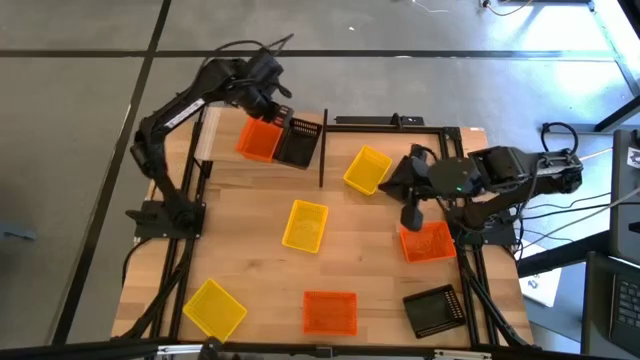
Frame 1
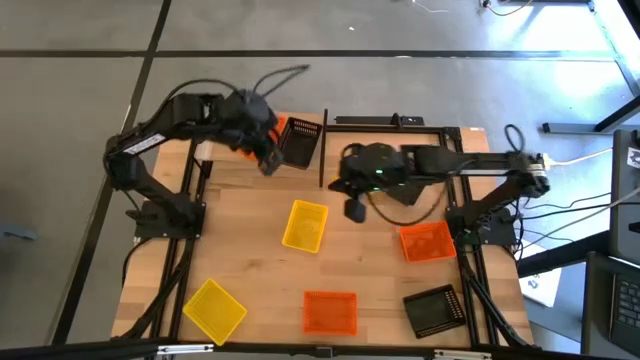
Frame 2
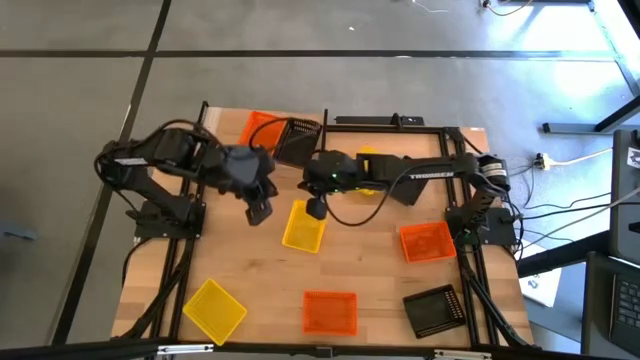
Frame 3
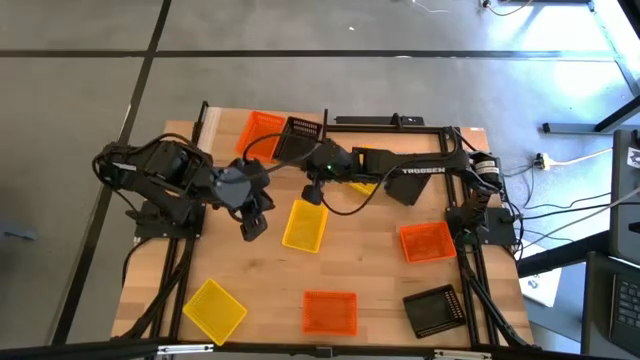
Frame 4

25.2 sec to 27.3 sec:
Task: Stack baskets on shelf by color
Adjust the black basket on the shelf

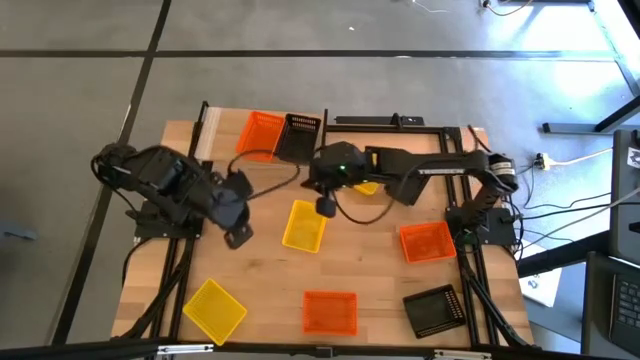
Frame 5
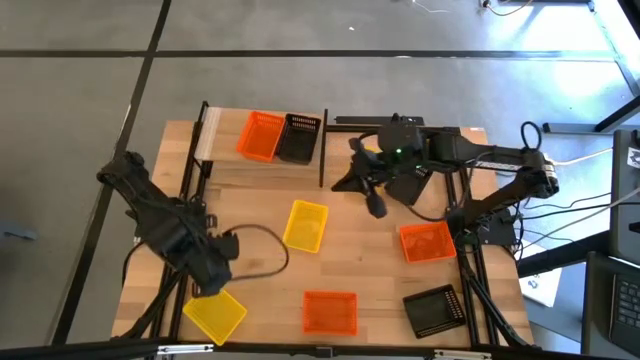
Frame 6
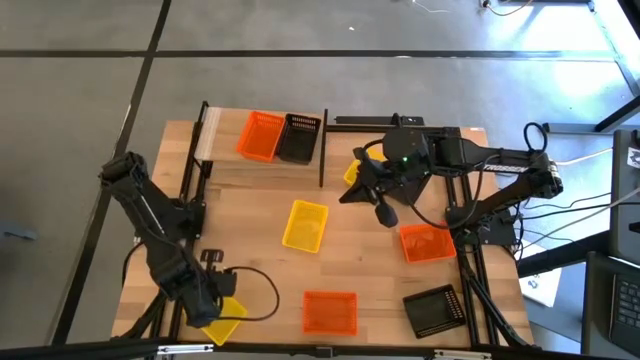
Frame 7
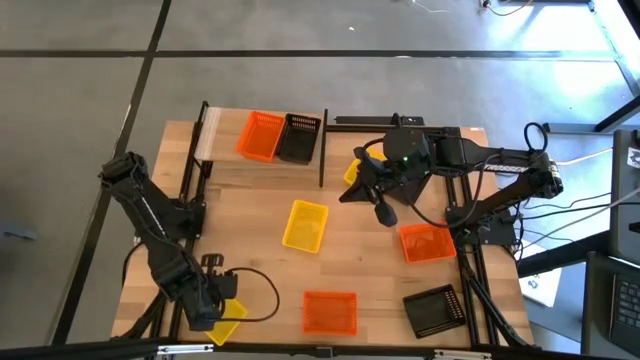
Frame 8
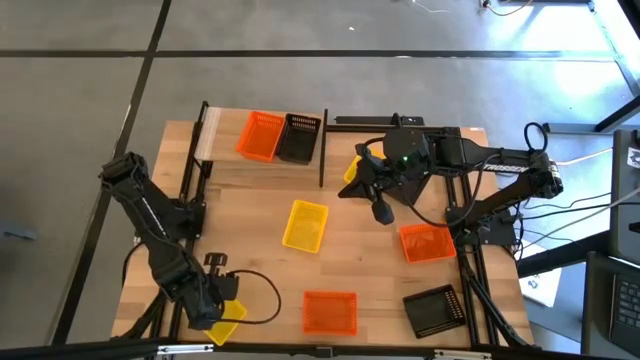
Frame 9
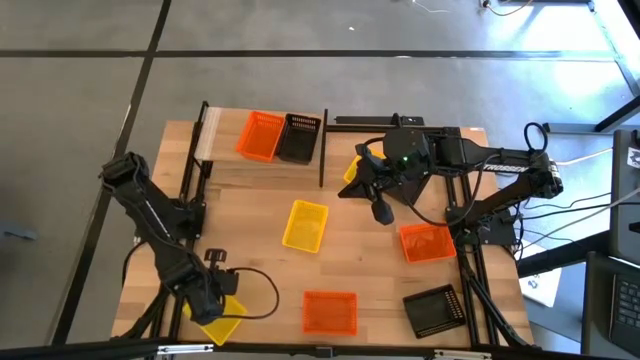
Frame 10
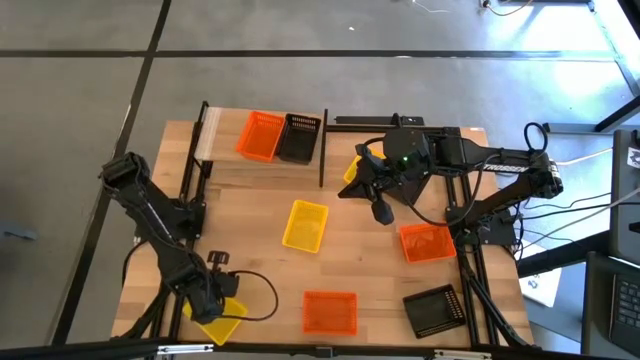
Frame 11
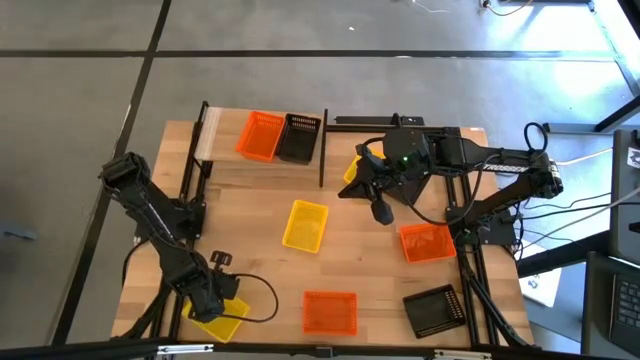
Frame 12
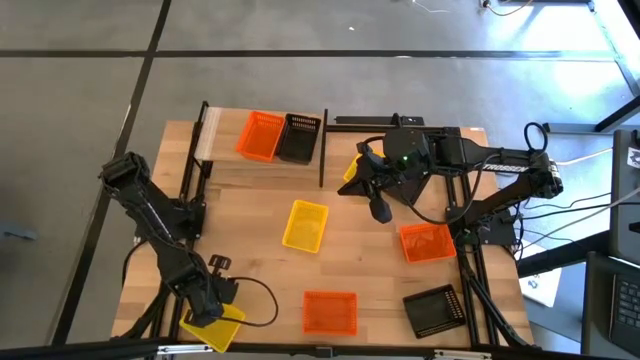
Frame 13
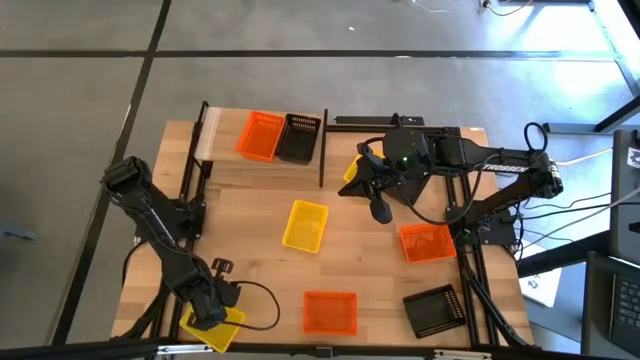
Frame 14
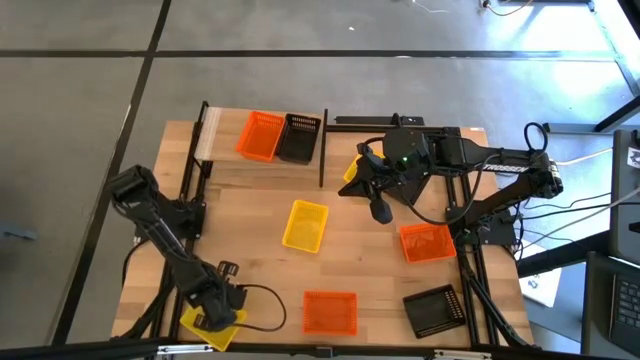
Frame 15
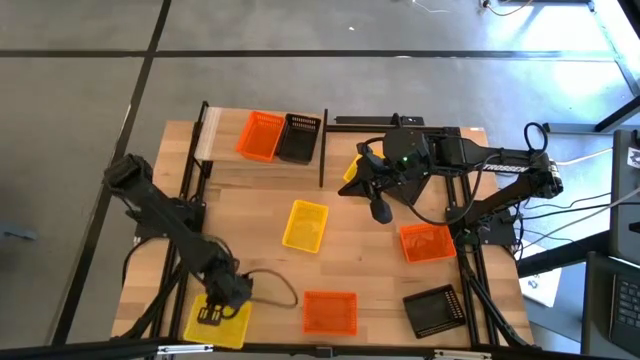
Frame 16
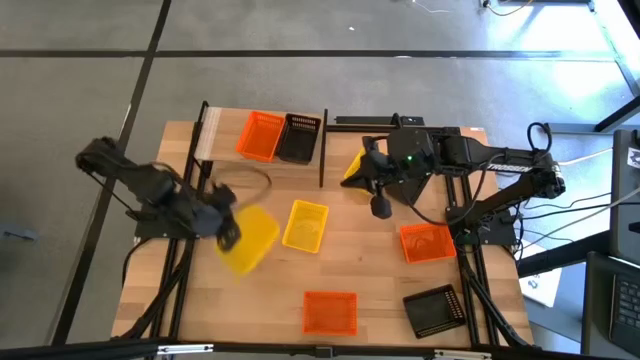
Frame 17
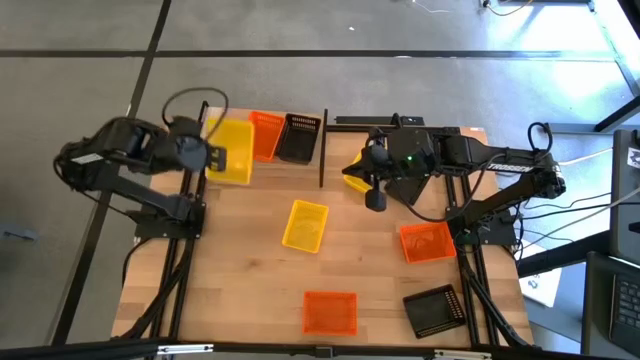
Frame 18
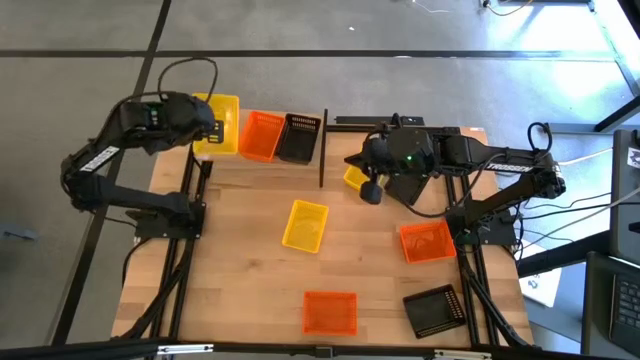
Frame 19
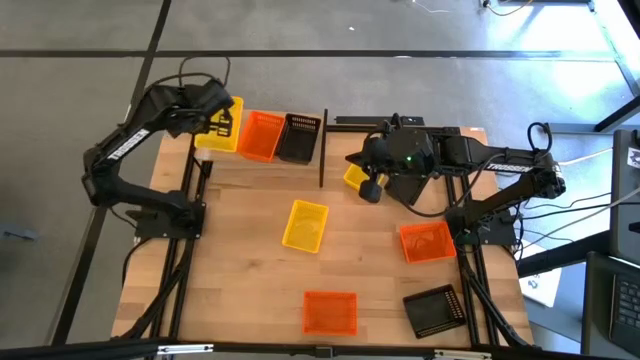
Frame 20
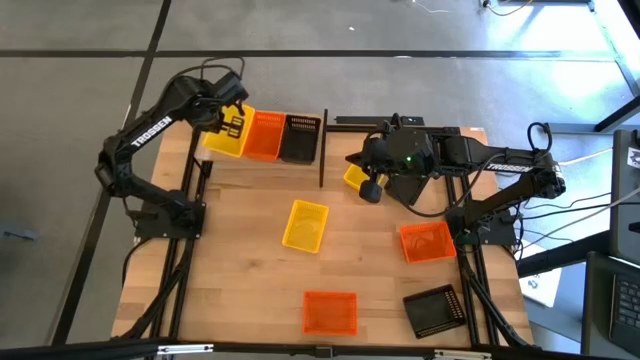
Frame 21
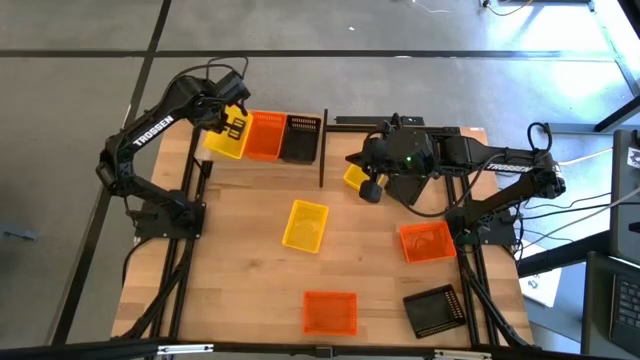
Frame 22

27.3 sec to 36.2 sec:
Put the bottom yellow basket on the shelf

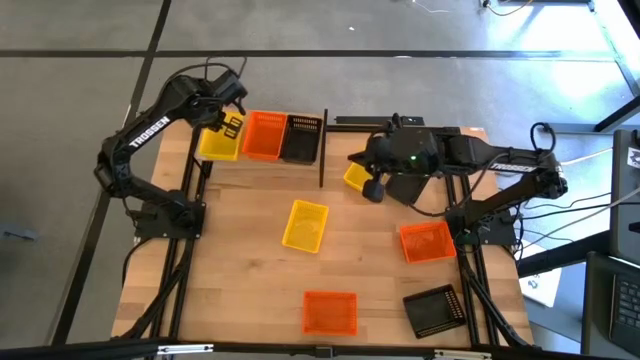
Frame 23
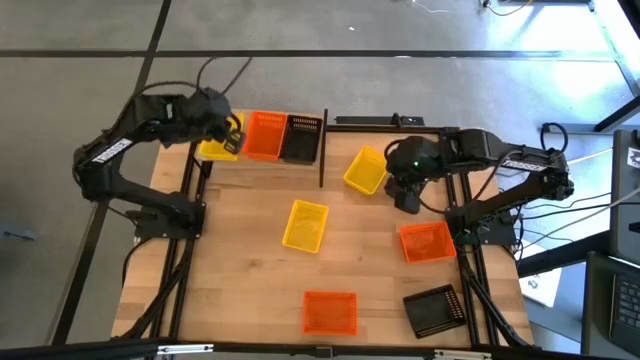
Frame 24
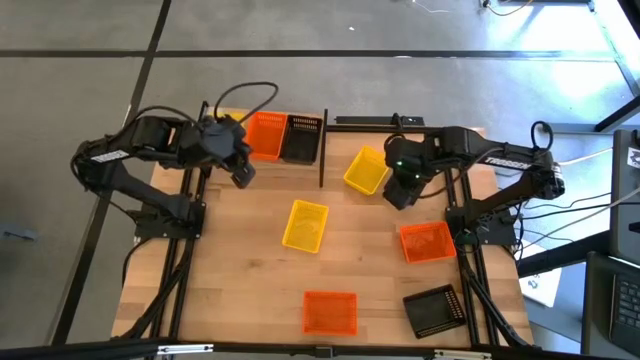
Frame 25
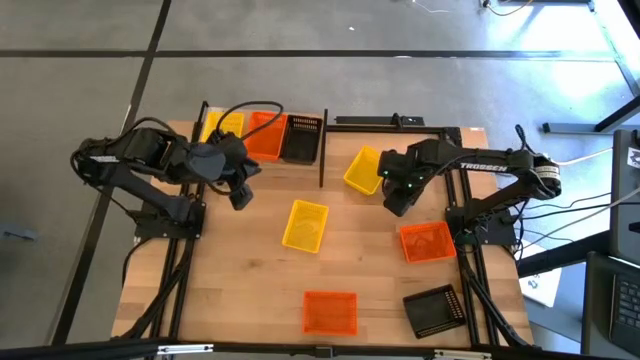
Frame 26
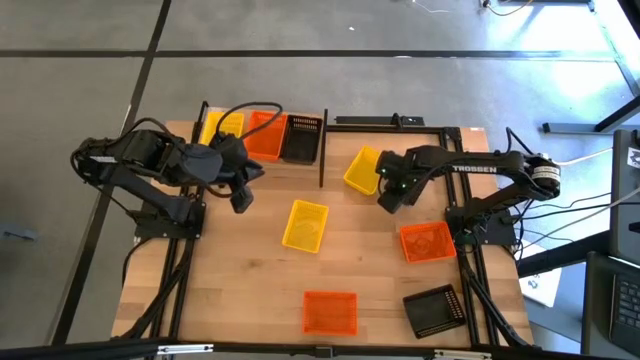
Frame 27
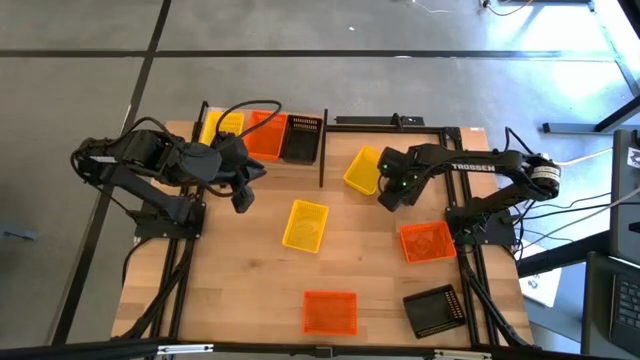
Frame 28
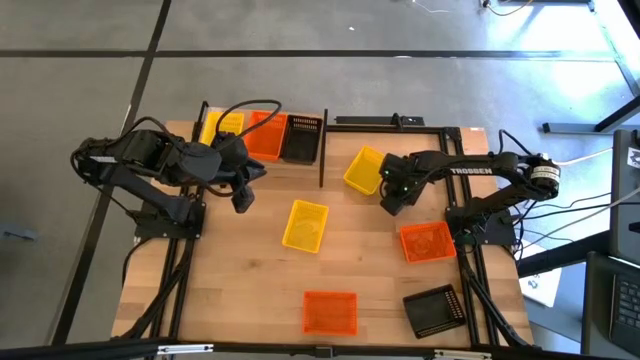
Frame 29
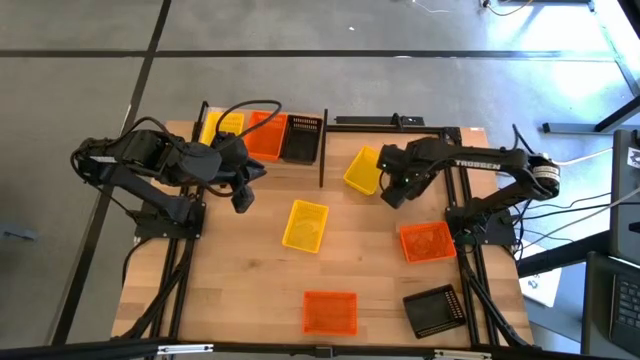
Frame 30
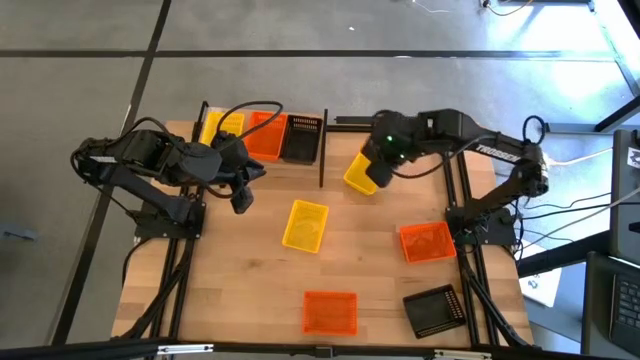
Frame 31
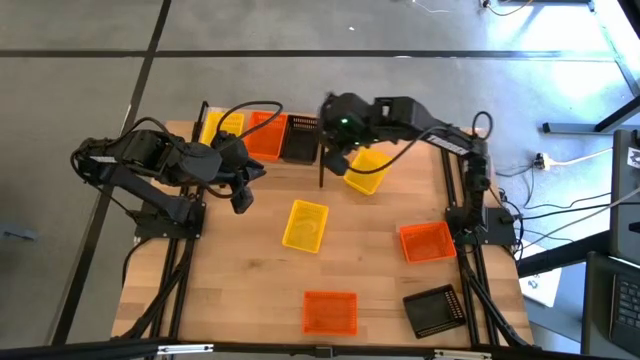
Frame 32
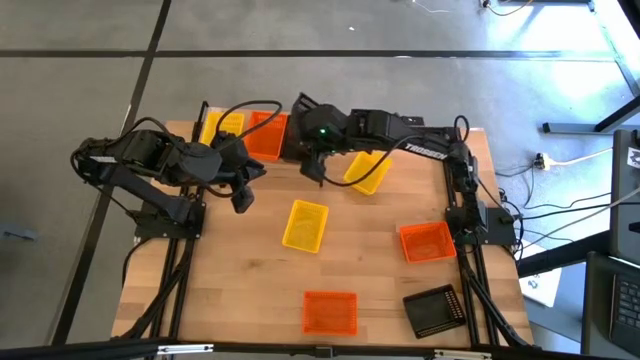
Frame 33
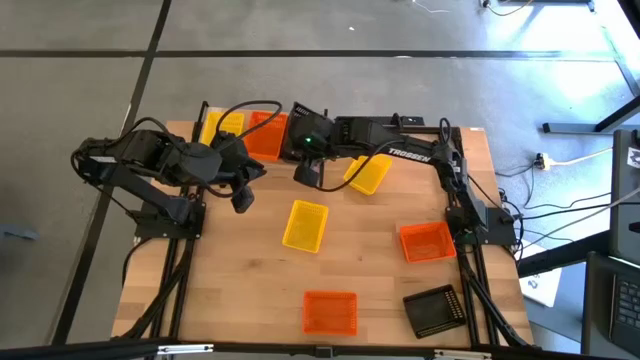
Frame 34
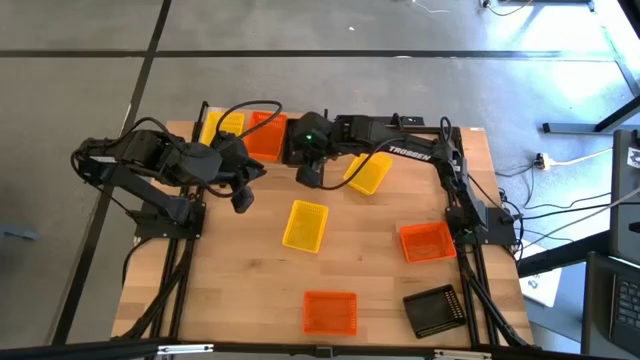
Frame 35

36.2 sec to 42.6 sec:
Stack the top black basket on top of the black basket on the shelf

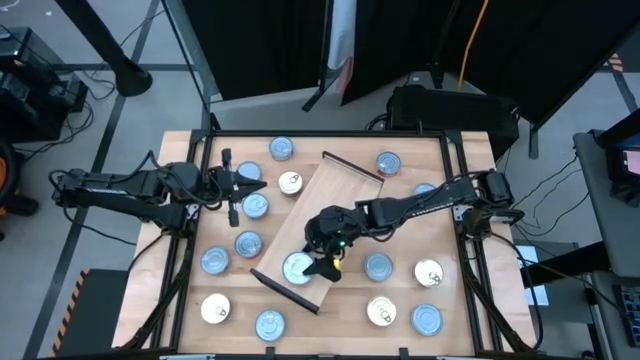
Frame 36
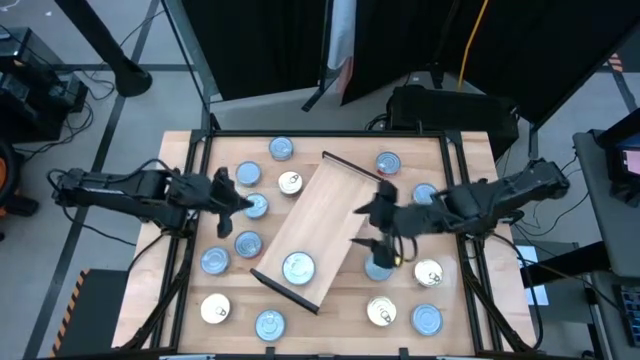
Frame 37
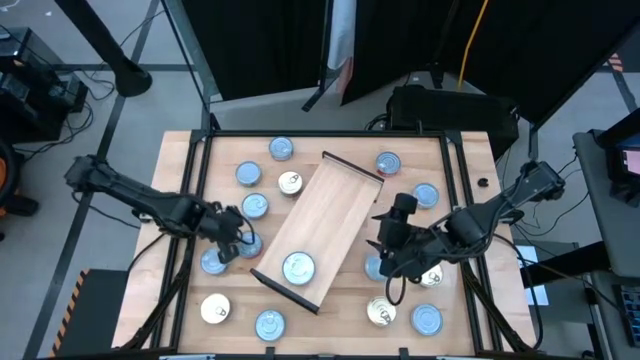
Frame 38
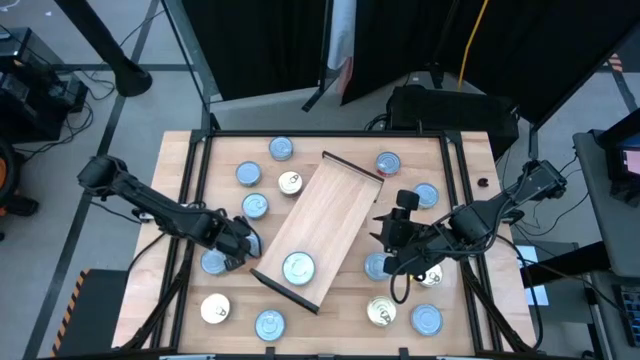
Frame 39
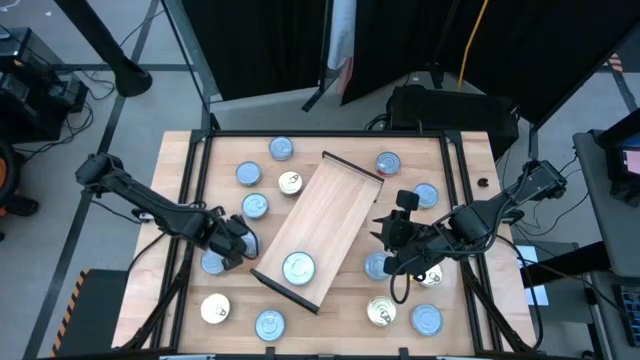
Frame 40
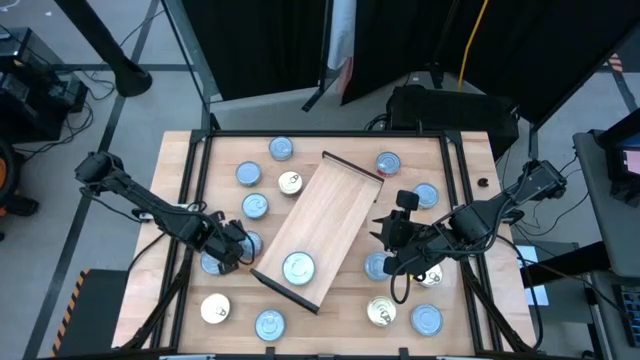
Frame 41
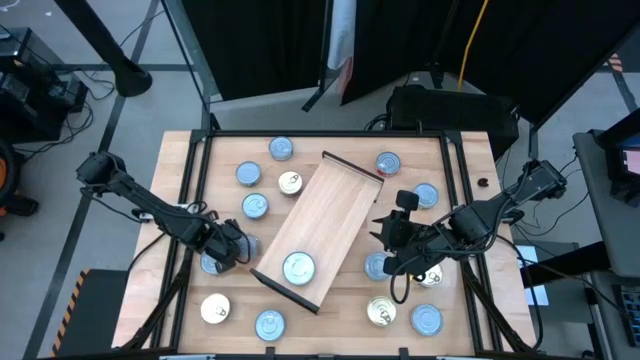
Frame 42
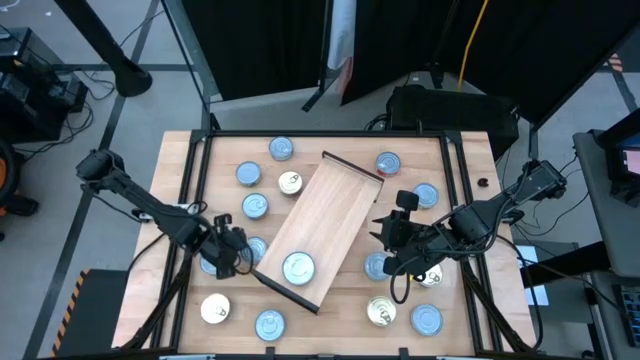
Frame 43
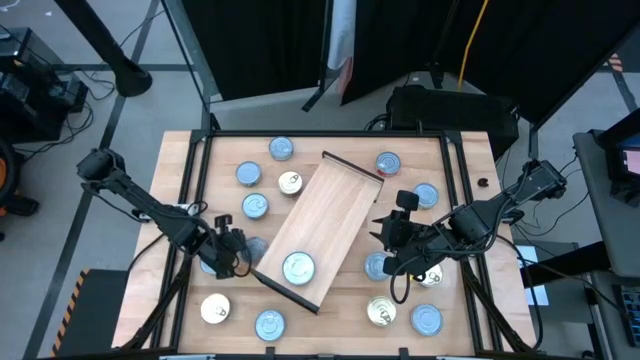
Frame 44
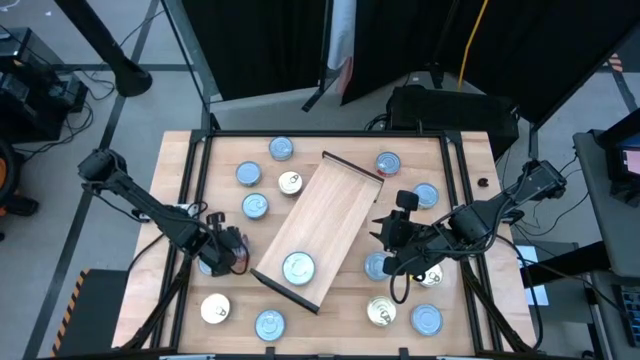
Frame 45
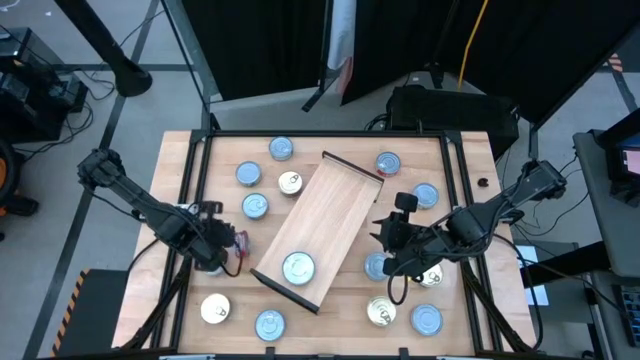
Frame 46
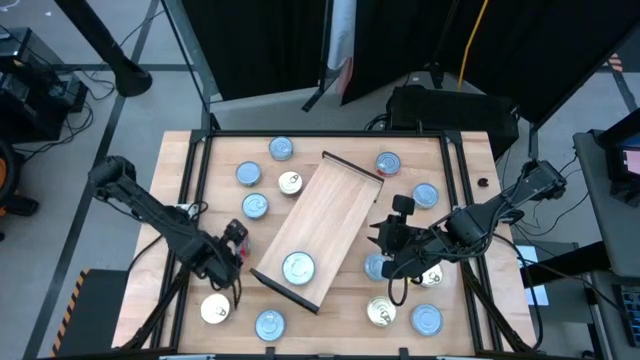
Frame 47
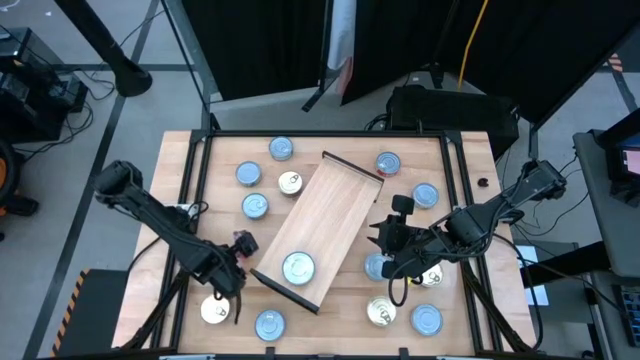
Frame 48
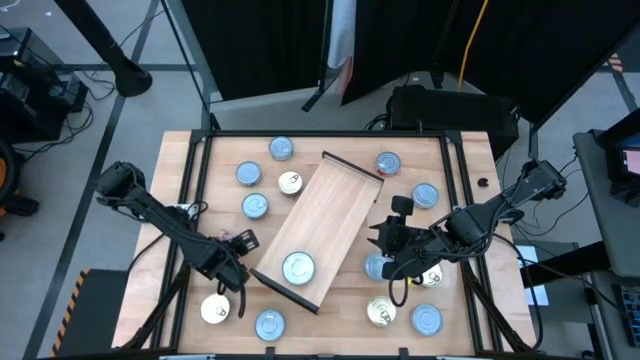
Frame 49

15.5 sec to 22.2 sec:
Task: Stack canned seafood by type on shelf
Stack the red tuna can on top of the other red tuna can on the shelf
